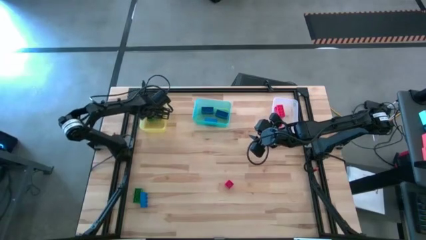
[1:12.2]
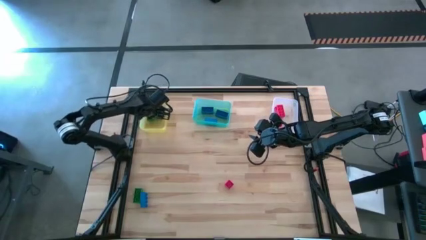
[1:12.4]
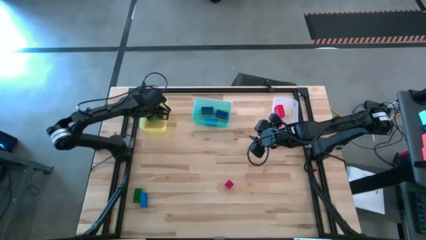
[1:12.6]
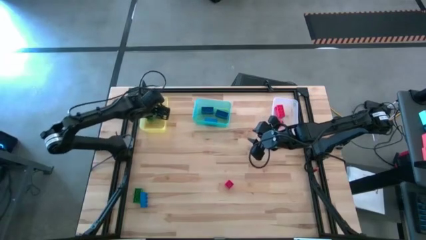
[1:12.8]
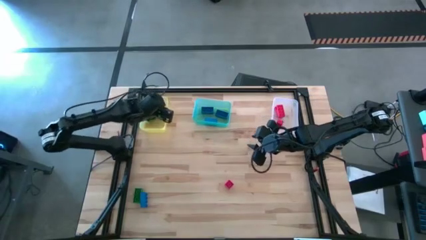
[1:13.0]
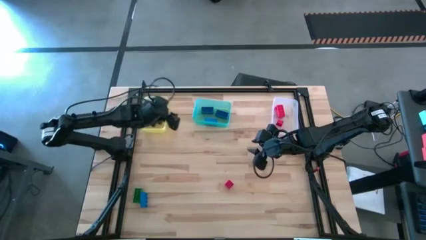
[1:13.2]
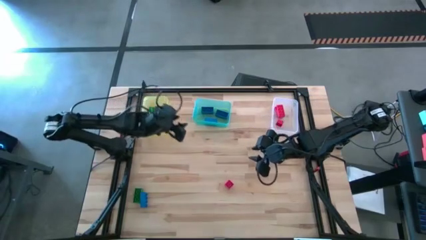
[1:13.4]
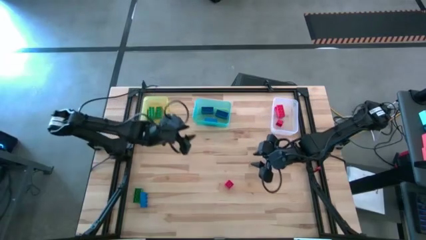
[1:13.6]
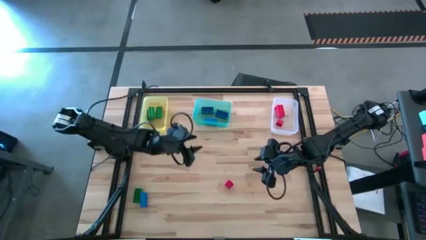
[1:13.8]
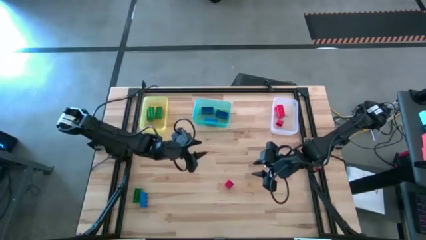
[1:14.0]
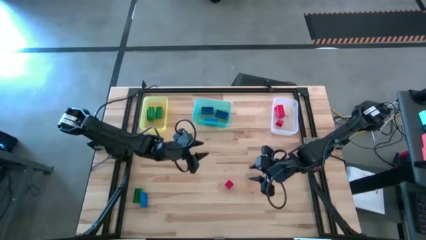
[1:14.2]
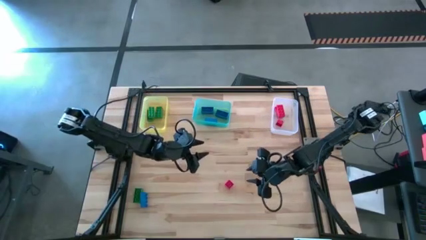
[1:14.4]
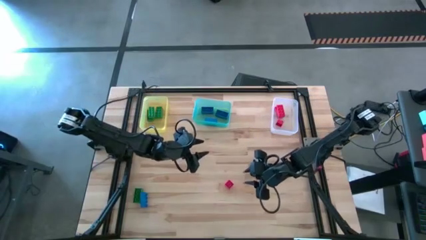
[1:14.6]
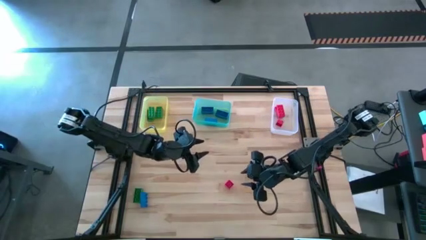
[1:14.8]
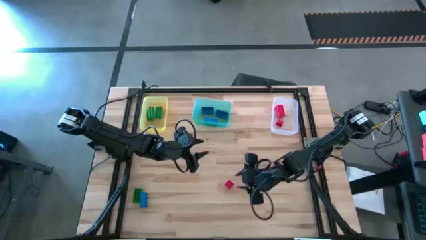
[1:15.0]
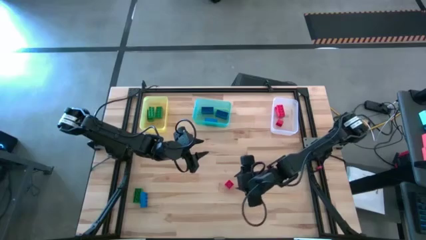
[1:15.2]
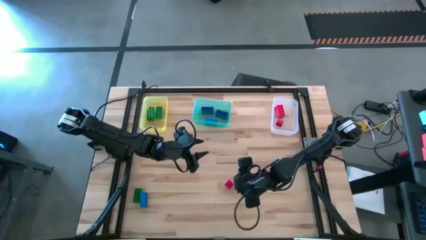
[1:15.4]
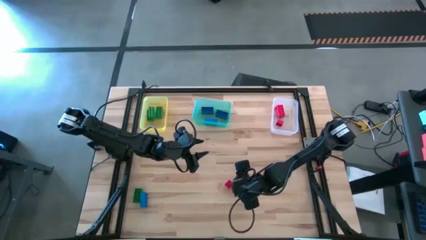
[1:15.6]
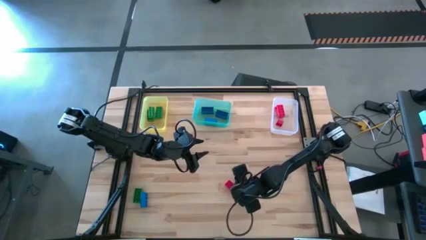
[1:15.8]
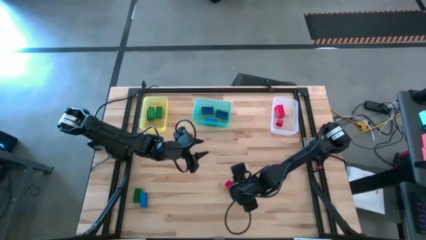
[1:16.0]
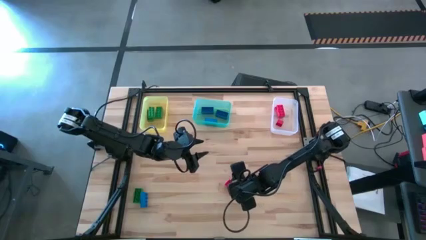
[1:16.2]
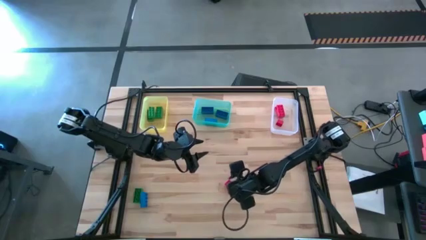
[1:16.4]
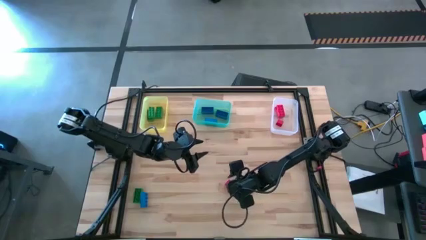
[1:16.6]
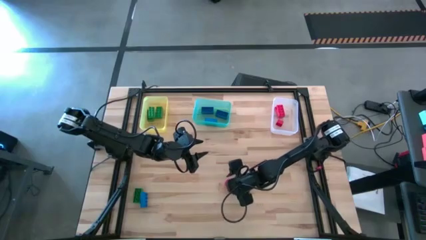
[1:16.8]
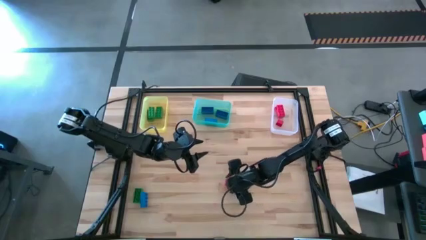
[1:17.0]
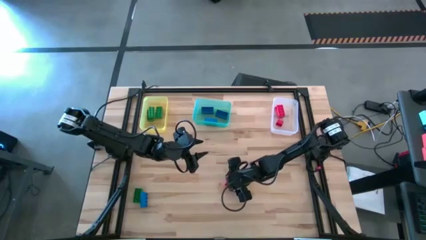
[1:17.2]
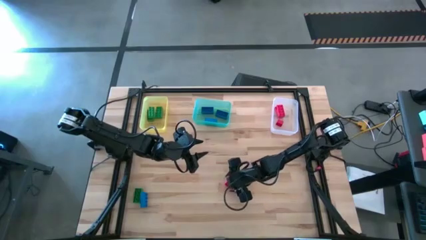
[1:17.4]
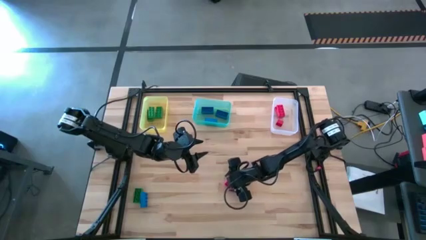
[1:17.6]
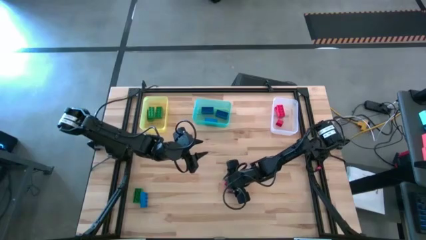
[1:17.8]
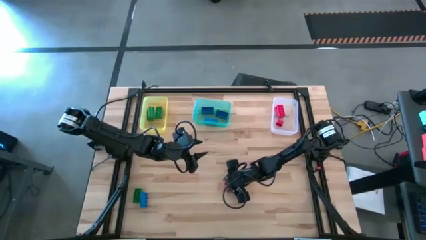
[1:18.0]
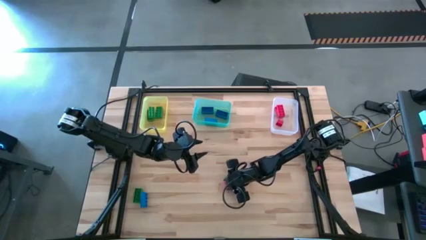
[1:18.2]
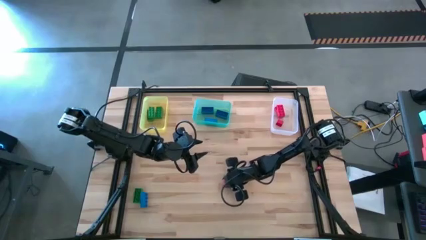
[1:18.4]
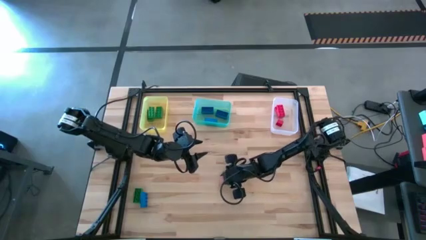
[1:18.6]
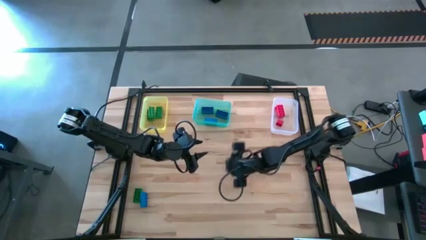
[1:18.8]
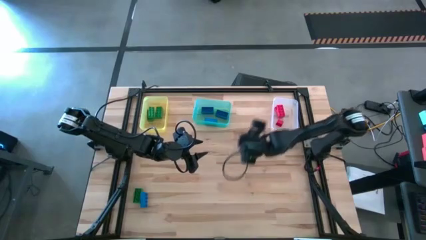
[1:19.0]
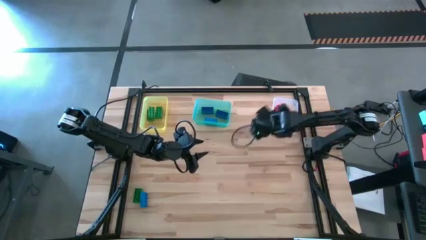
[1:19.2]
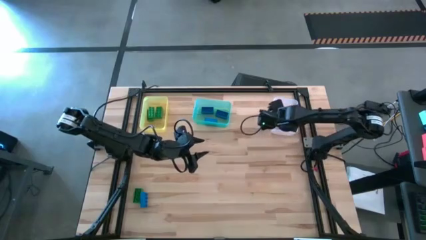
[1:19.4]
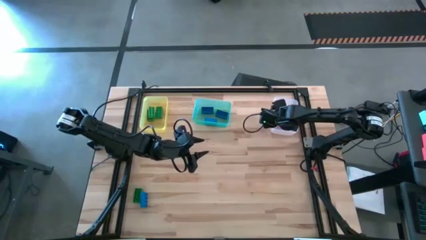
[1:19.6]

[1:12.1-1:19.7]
Task: Sort & place blocks by color
Put the red game piece into the transparent bin

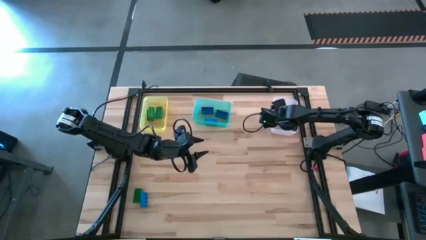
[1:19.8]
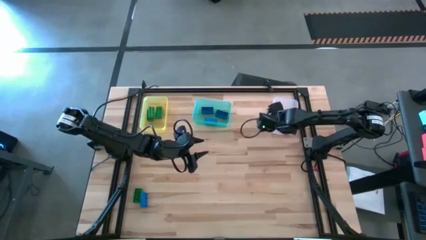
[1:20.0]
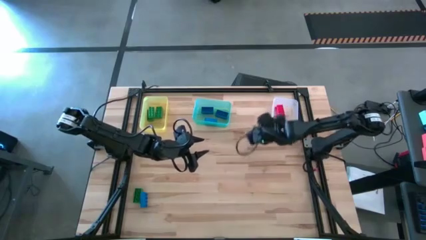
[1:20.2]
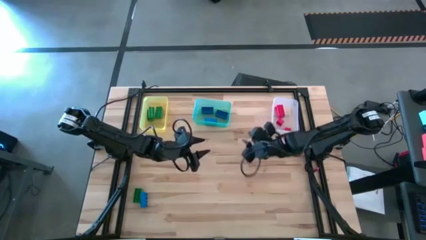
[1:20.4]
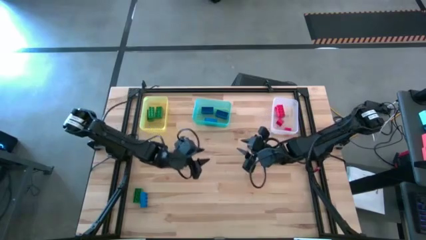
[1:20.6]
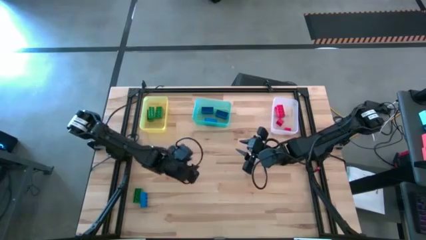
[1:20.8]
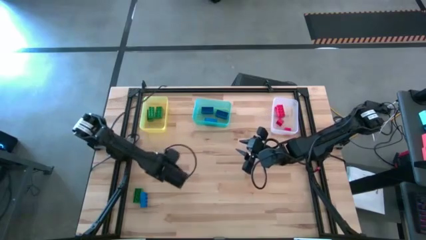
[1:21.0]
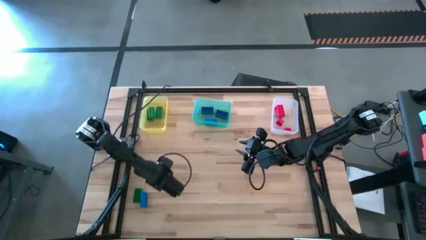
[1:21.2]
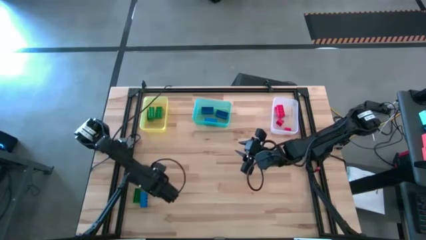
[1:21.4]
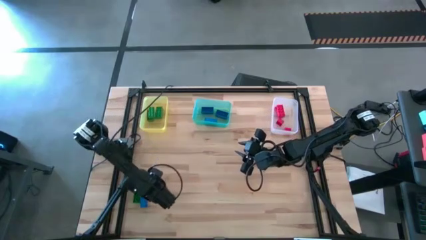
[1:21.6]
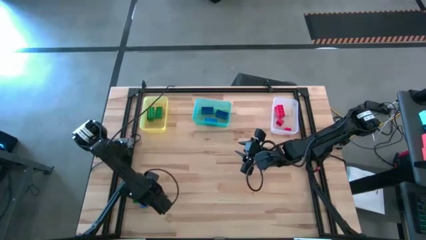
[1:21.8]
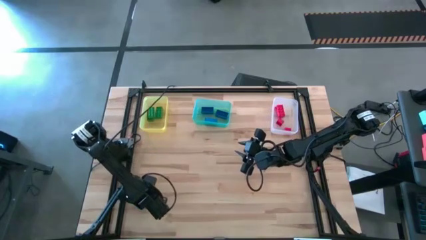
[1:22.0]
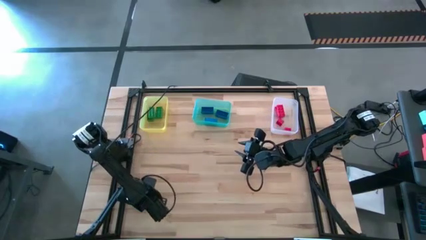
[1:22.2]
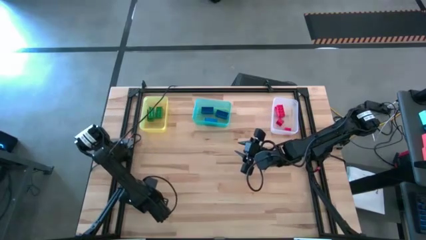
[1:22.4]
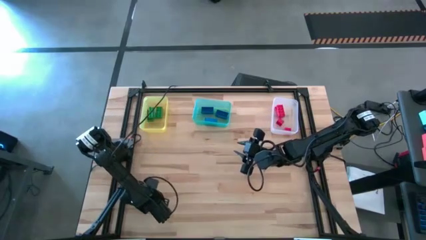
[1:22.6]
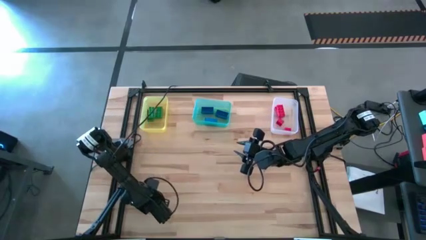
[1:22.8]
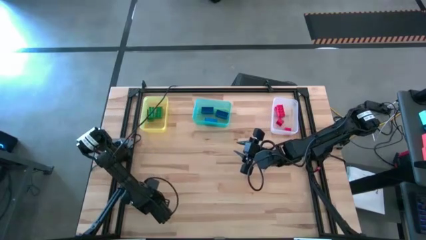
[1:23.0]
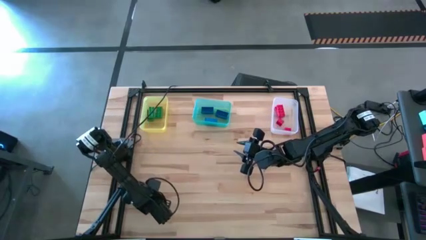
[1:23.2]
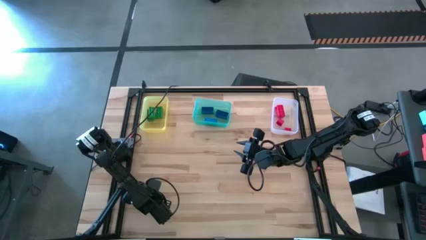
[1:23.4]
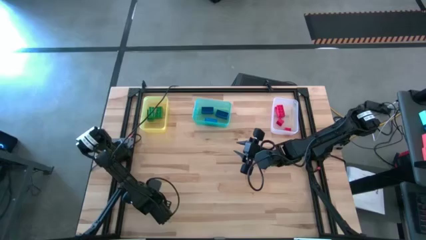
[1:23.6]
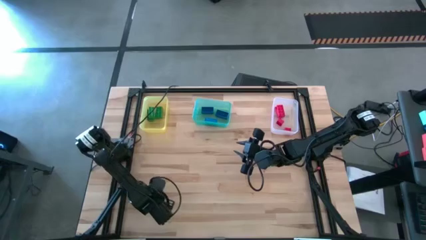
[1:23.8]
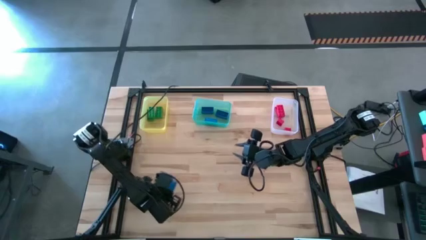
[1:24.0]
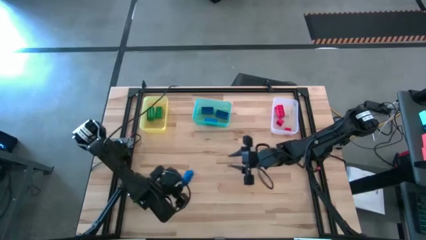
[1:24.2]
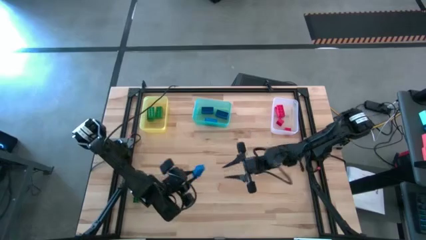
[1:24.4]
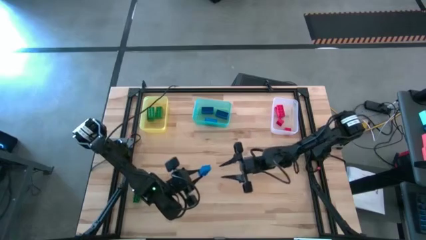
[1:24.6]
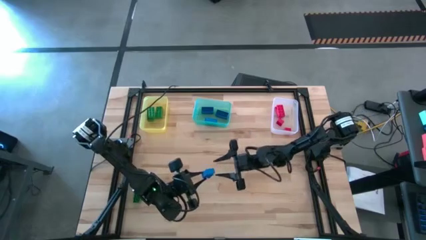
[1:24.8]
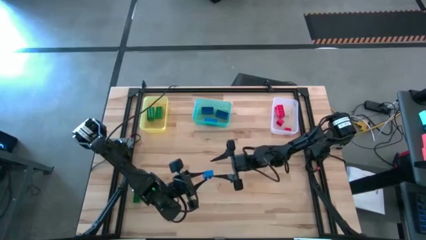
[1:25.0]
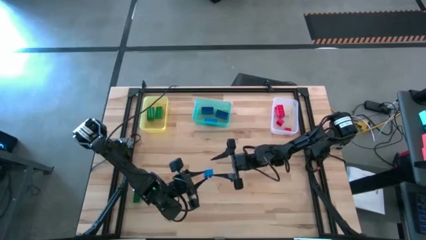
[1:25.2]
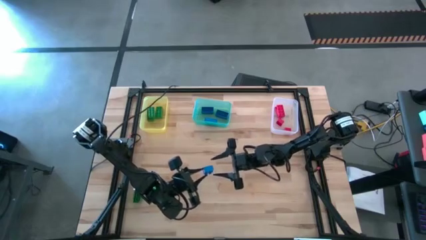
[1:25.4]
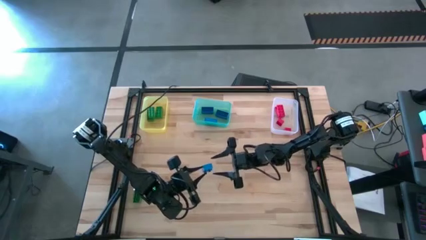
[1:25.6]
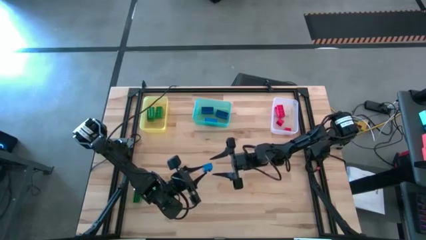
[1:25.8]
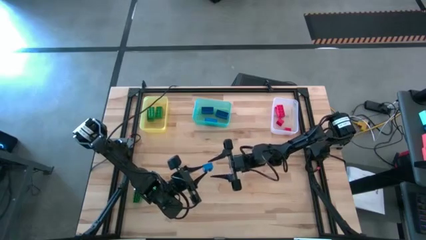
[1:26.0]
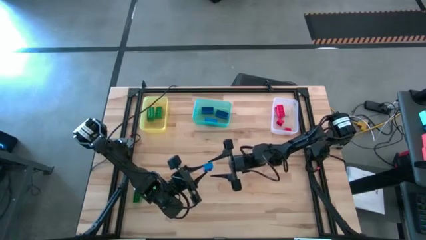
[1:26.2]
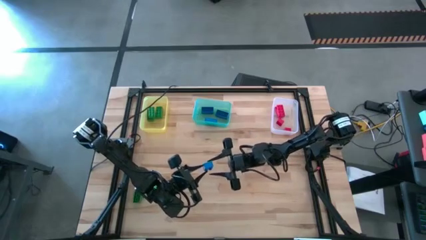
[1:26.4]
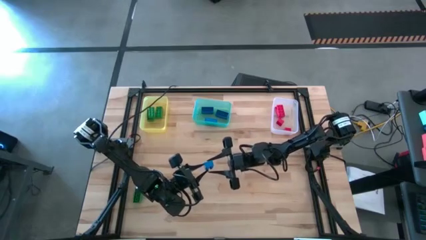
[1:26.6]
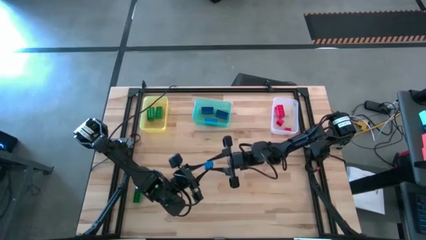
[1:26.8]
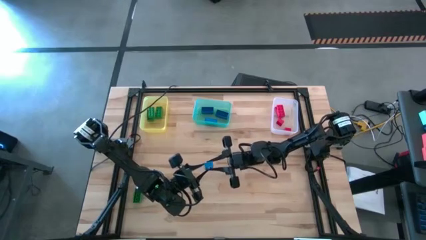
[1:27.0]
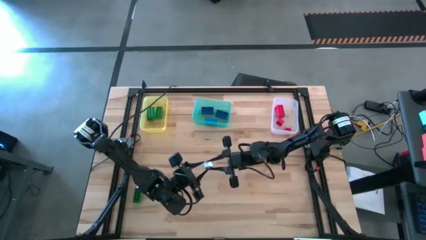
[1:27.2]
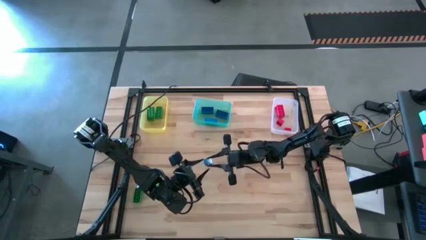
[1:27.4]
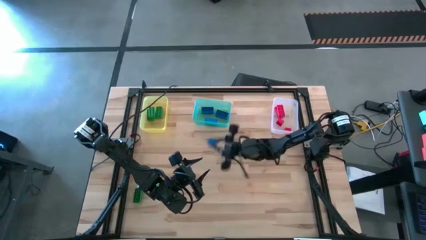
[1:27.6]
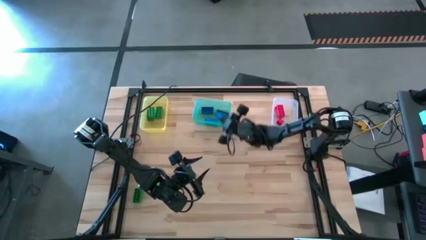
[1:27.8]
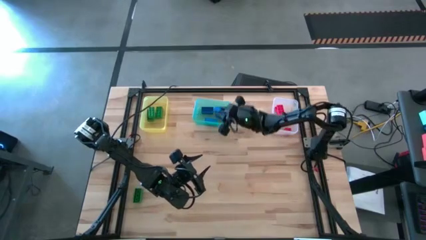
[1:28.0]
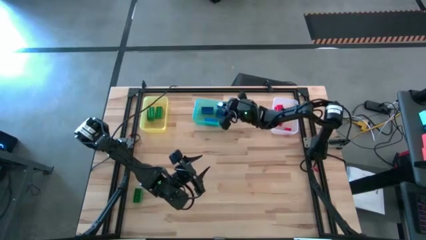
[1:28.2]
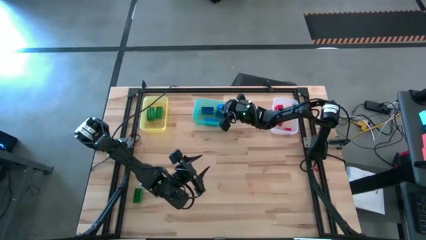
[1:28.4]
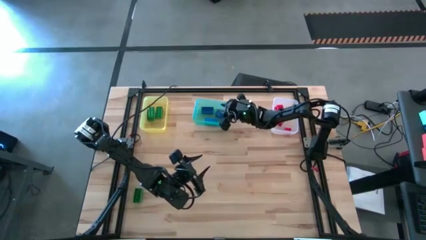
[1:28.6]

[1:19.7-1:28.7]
Put the blue game piece into the green bin
